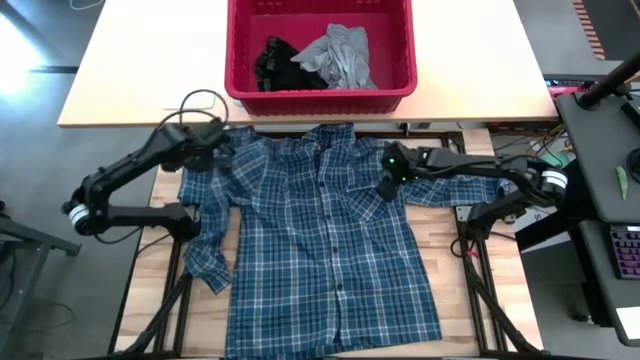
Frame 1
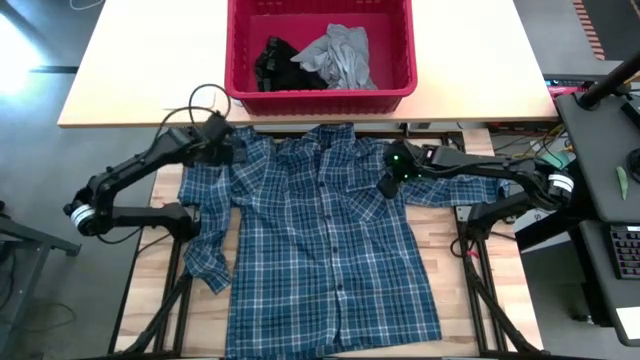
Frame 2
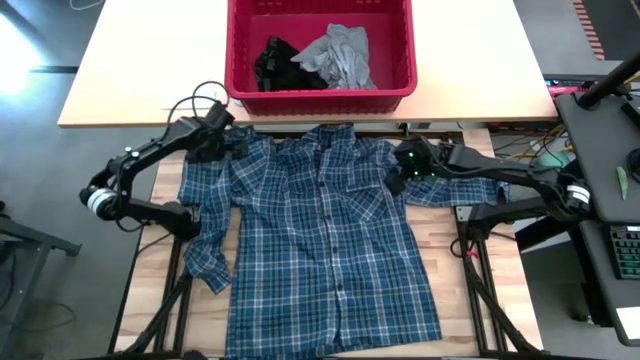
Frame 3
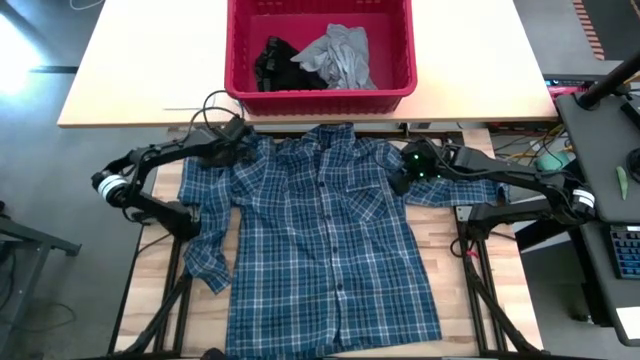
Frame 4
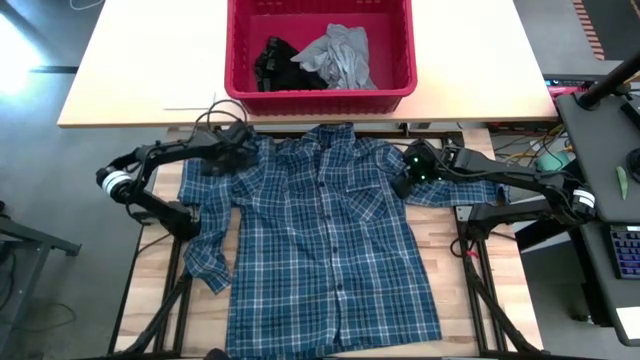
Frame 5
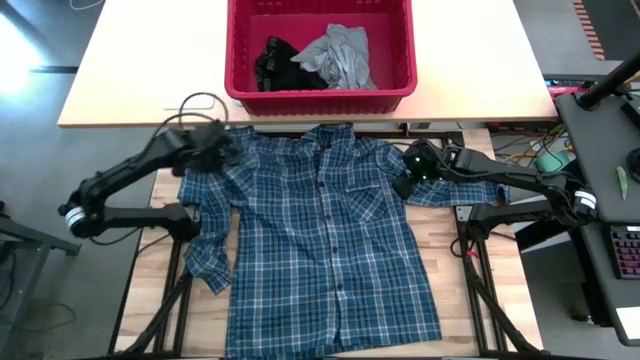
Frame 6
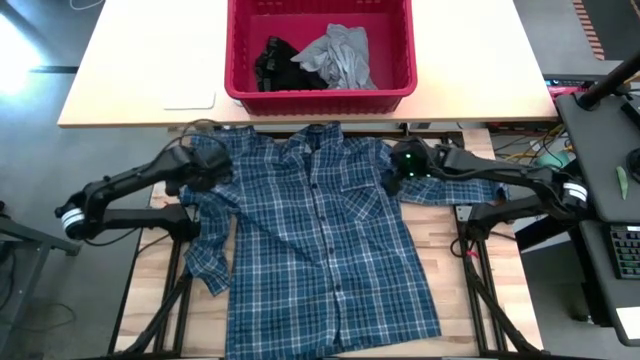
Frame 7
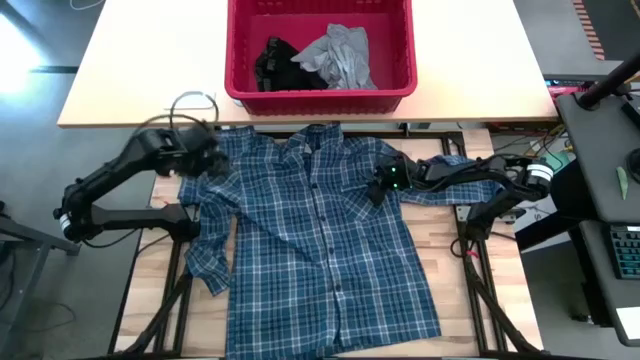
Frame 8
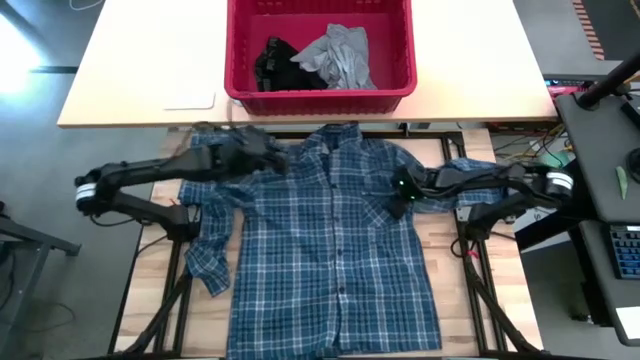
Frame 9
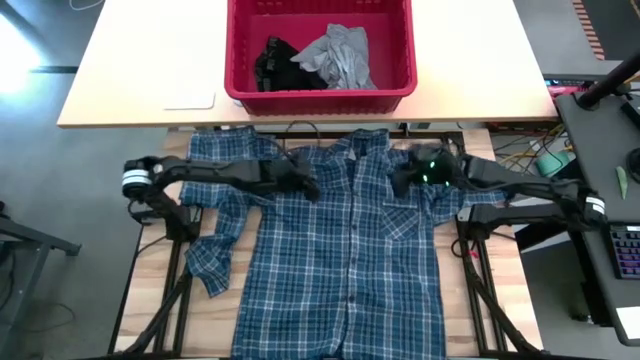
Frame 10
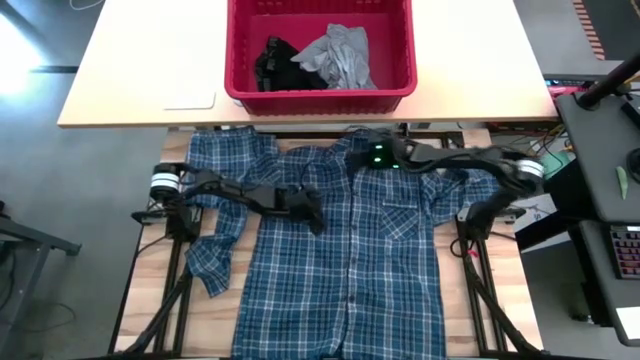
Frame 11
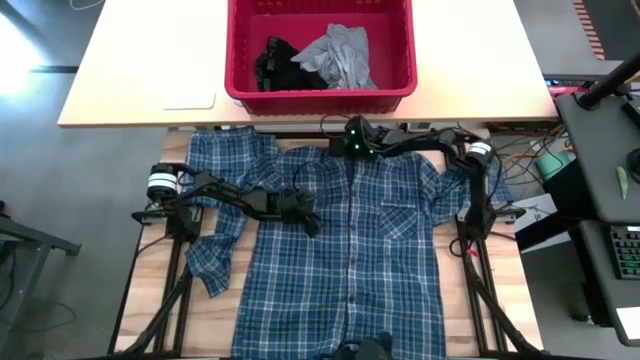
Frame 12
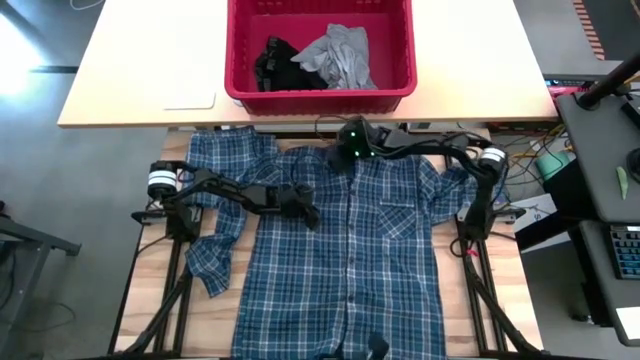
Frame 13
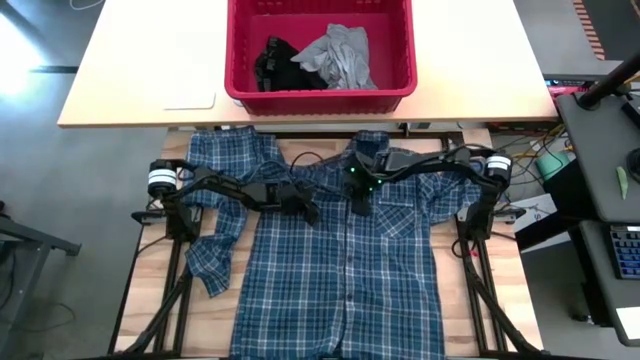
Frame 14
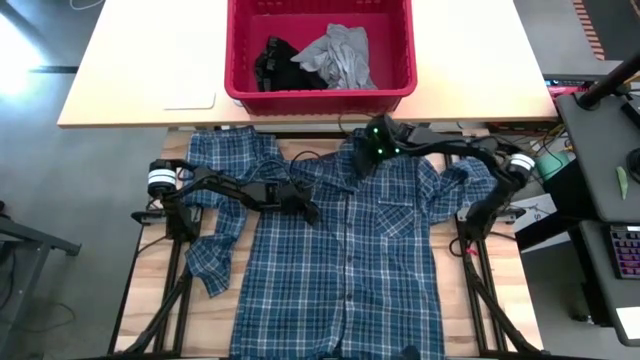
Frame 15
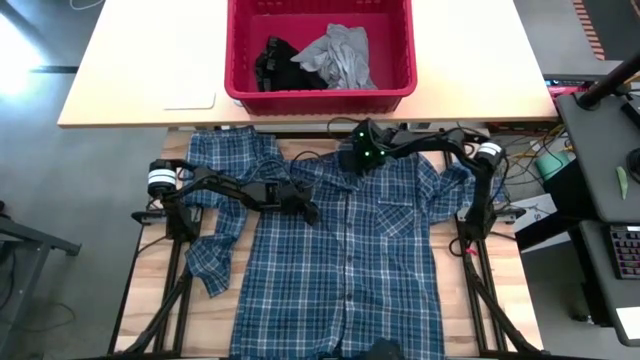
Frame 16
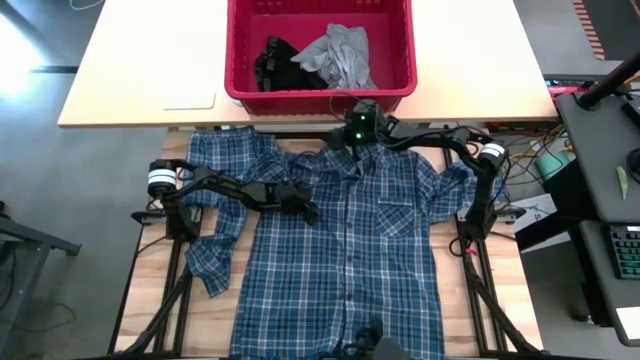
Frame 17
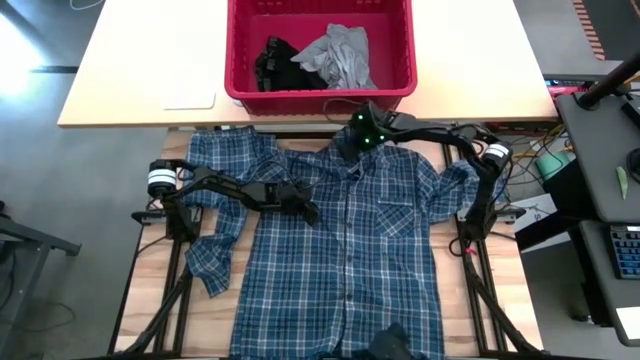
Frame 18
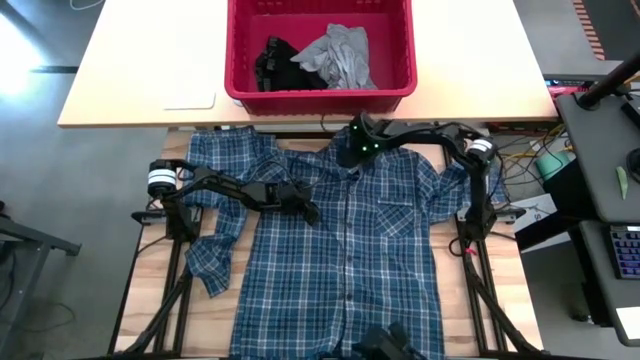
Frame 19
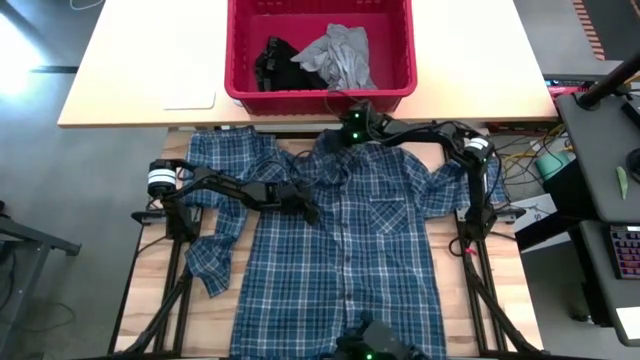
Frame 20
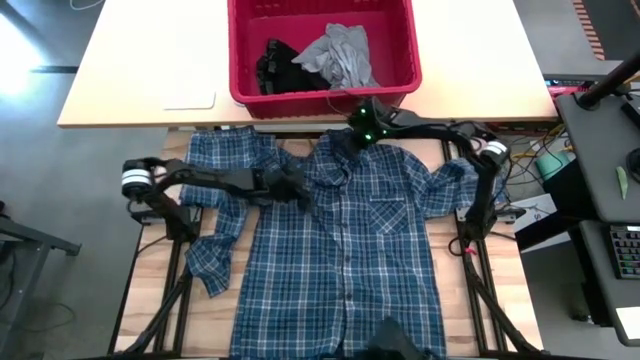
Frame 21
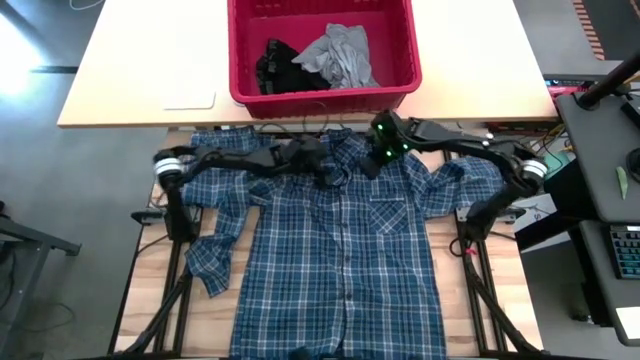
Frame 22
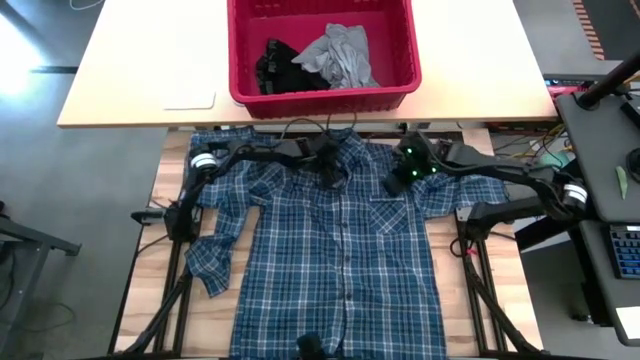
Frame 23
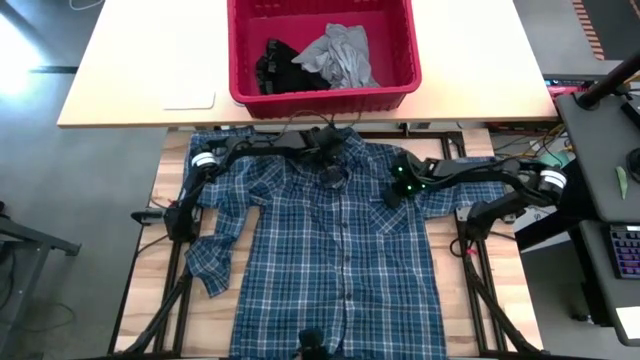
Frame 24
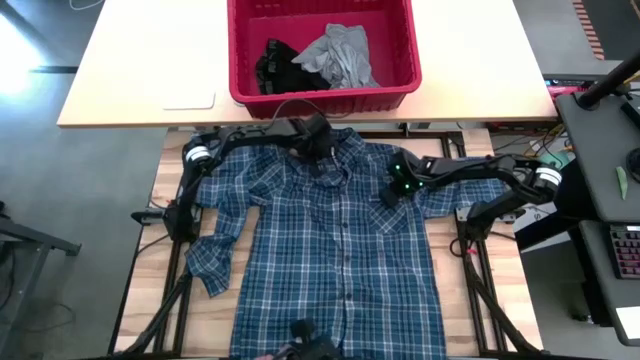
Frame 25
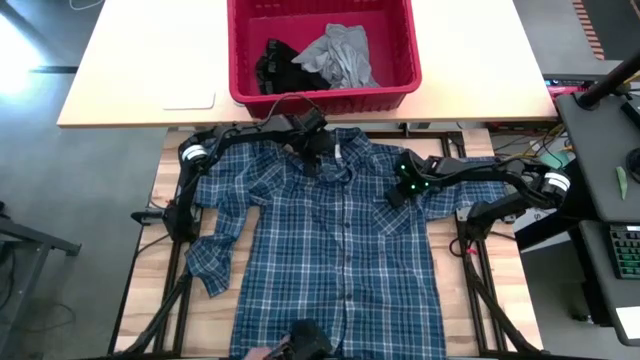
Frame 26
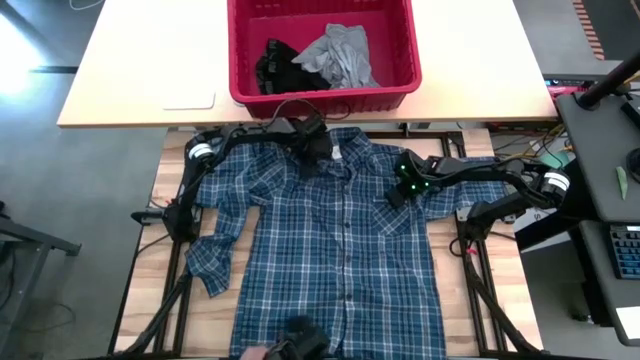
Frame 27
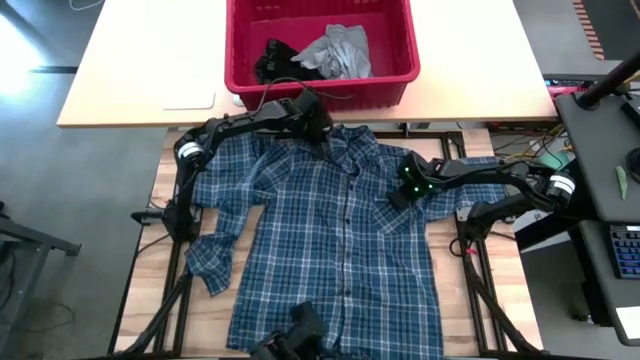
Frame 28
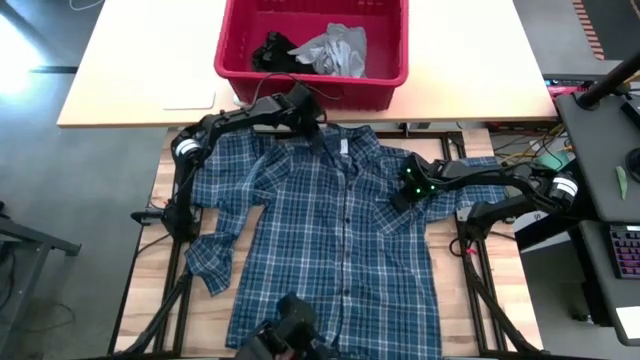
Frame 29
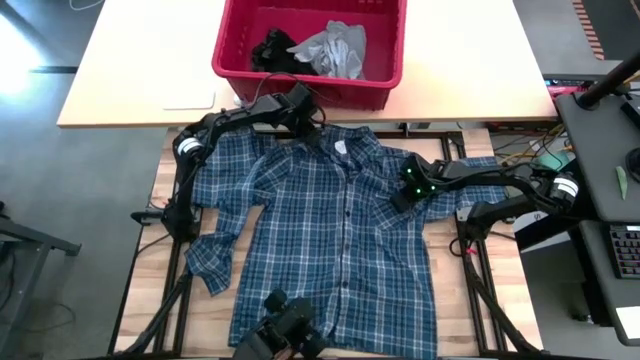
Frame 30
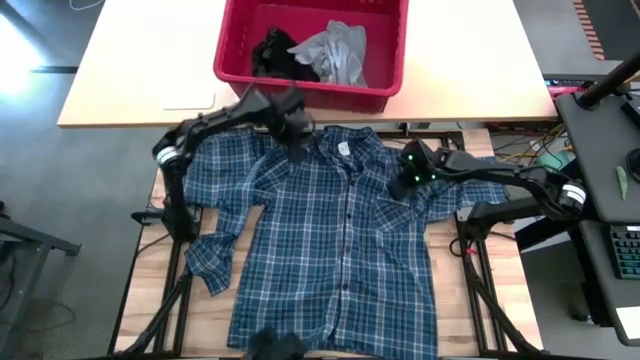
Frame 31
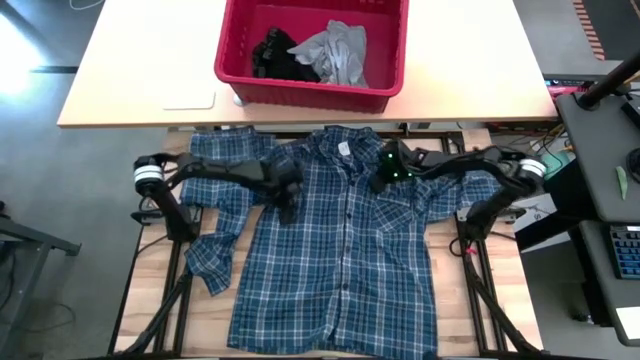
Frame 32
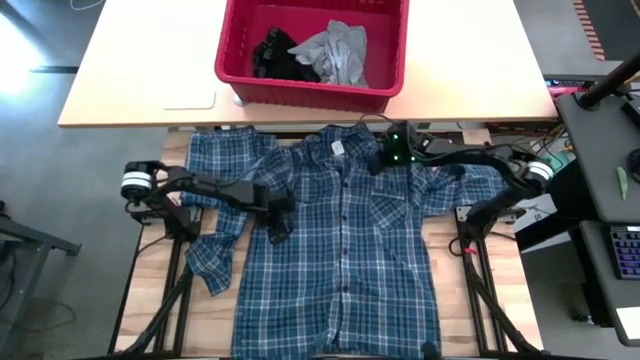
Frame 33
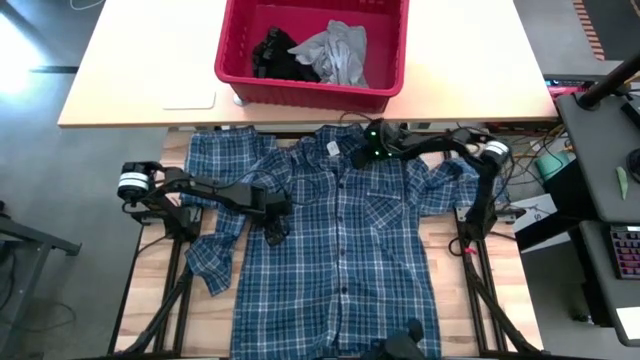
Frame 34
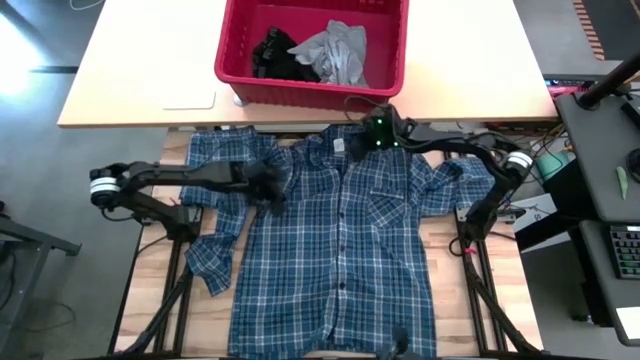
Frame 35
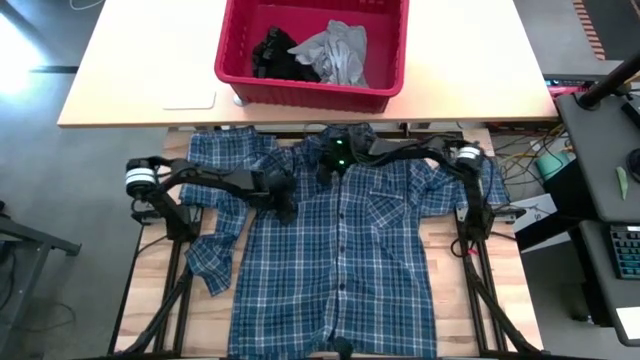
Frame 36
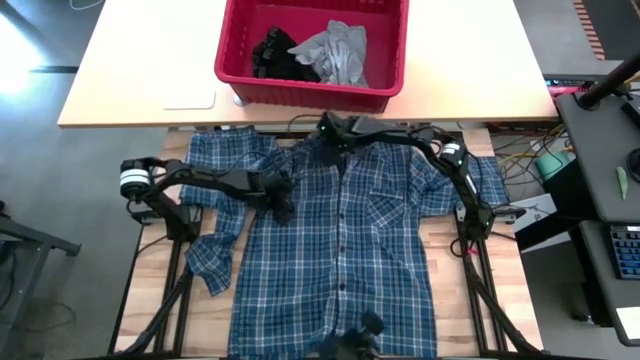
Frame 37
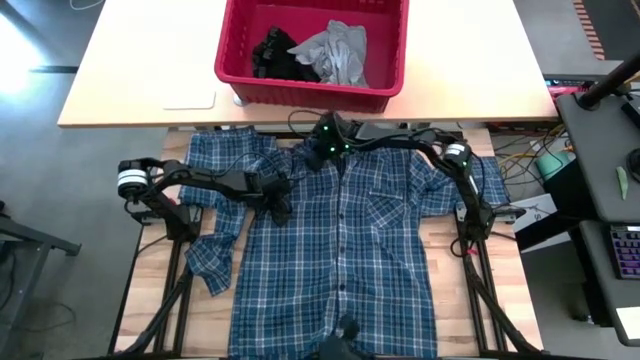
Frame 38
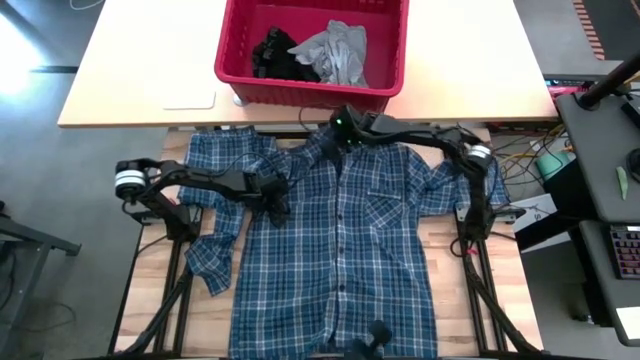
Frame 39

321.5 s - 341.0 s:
Task: Fold Laundry from Bin
Fold the blue patterned long sleeve shirt

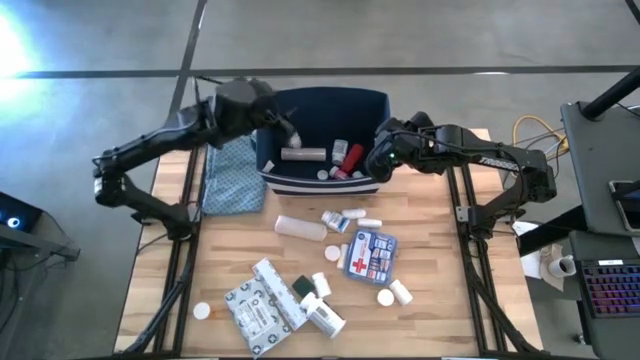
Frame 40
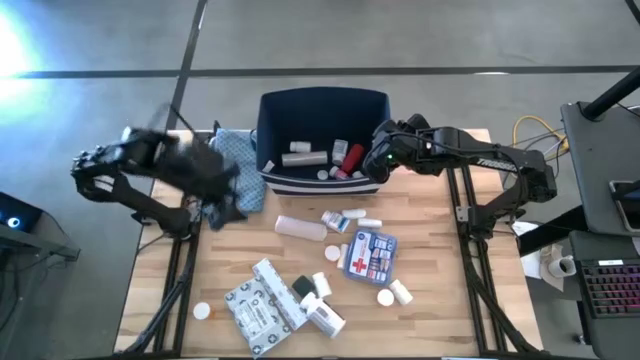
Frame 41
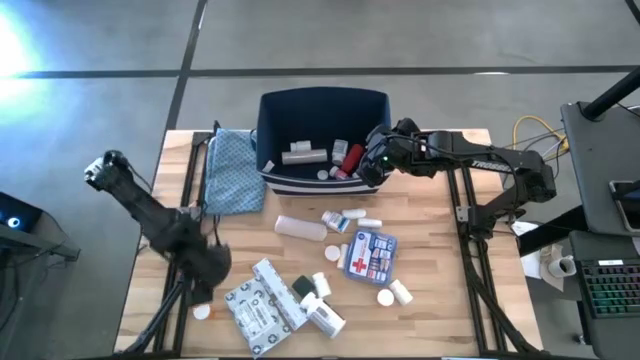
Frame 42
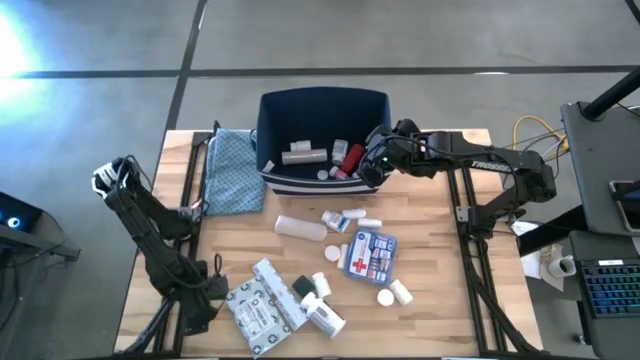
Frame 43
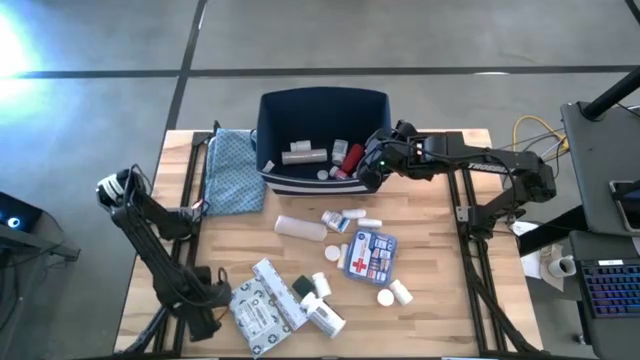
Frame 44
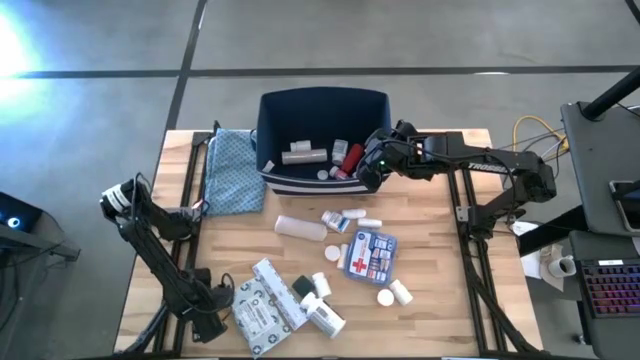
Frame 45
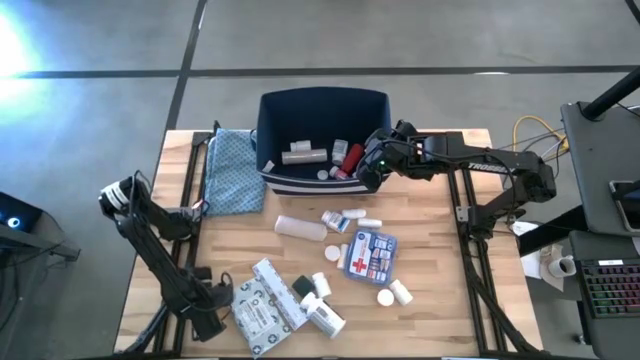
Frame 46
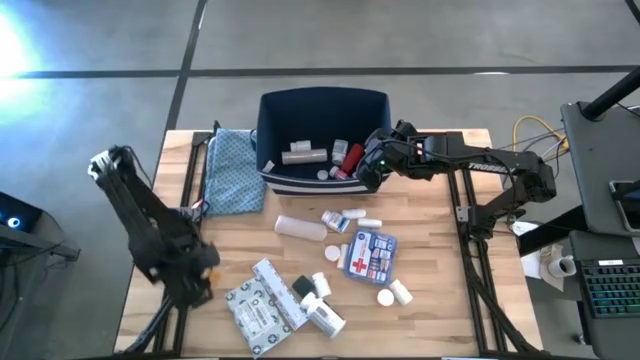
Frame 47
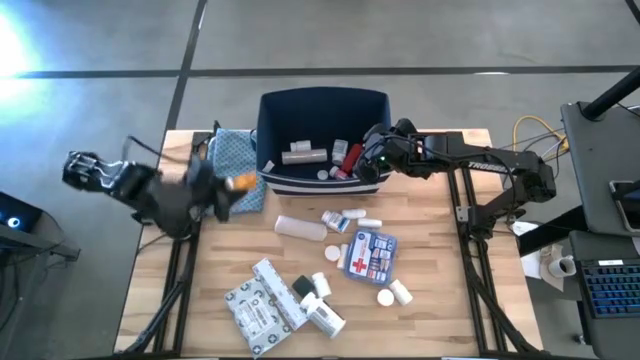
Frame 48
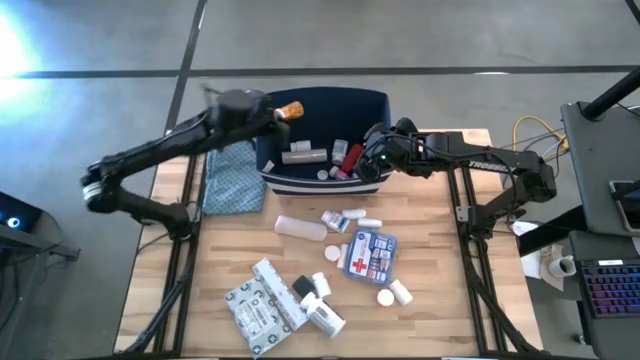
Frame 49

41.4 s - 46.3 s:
Task: Pick & place medical supplies in basket/bin
Put the orange pill bottle into the blue bin
